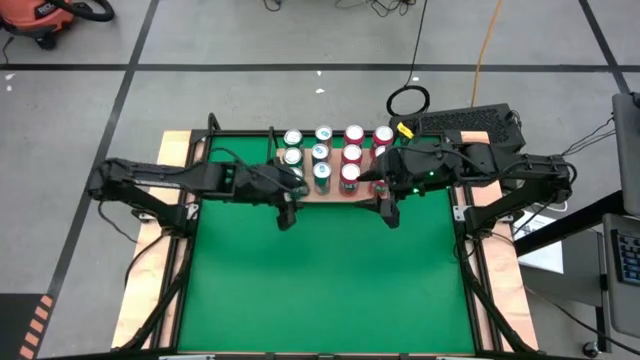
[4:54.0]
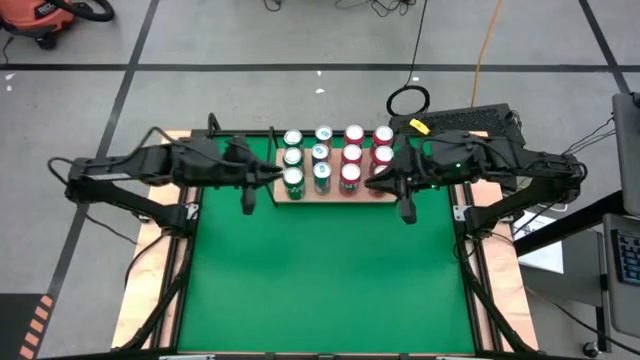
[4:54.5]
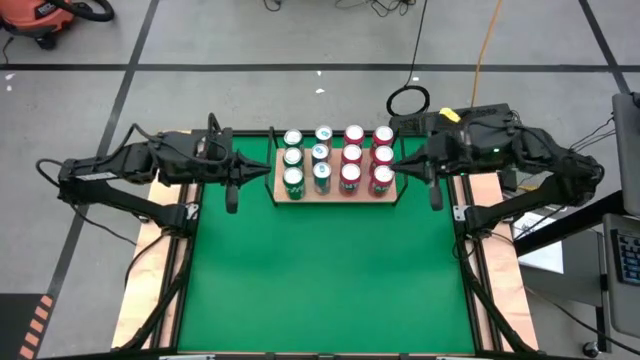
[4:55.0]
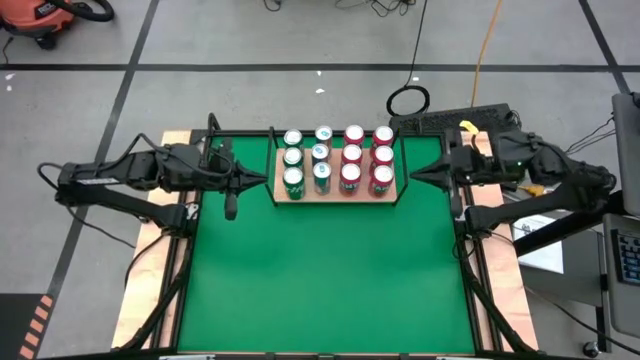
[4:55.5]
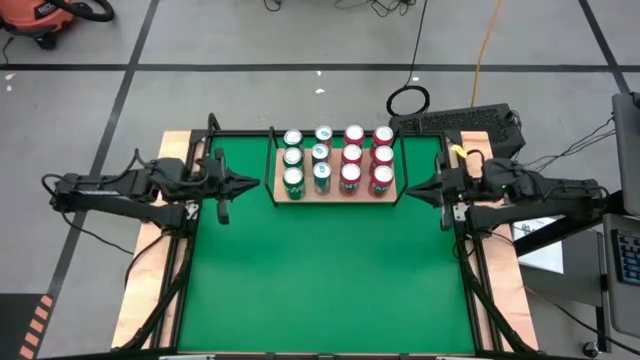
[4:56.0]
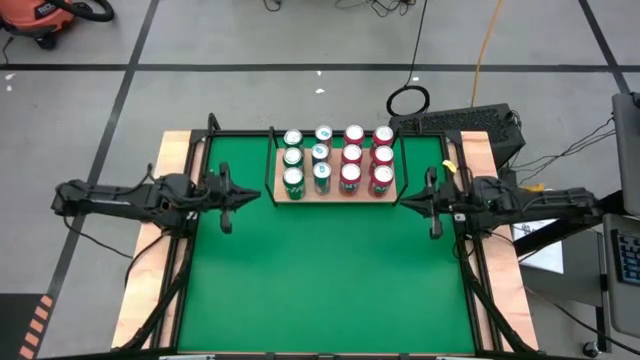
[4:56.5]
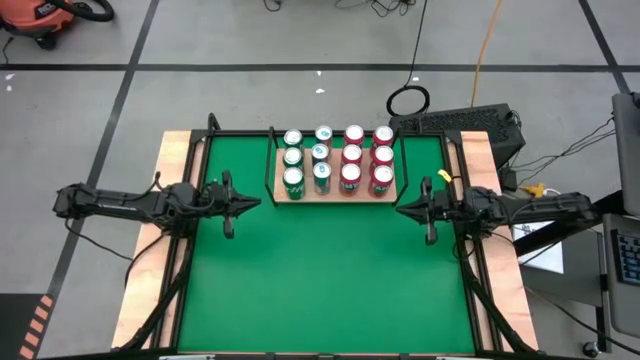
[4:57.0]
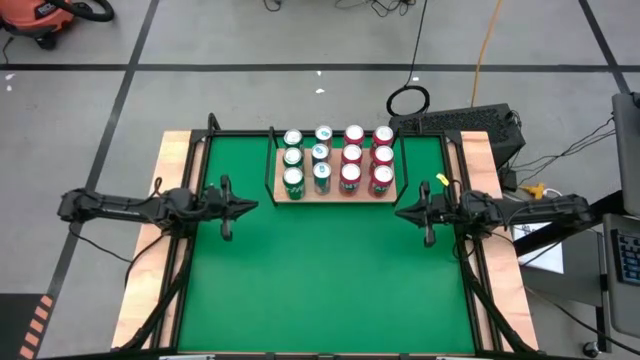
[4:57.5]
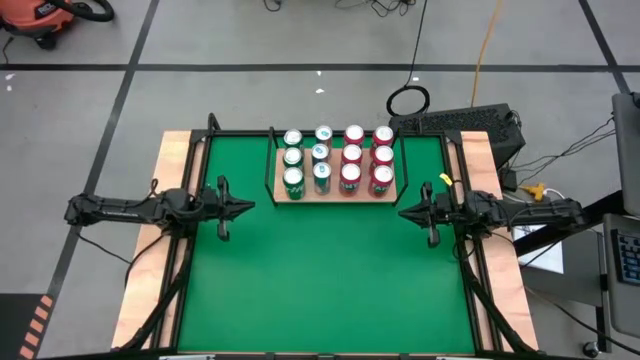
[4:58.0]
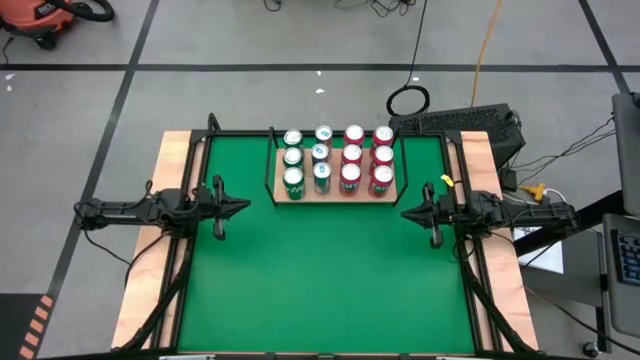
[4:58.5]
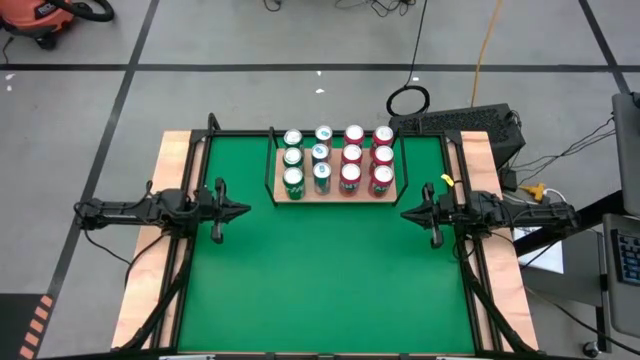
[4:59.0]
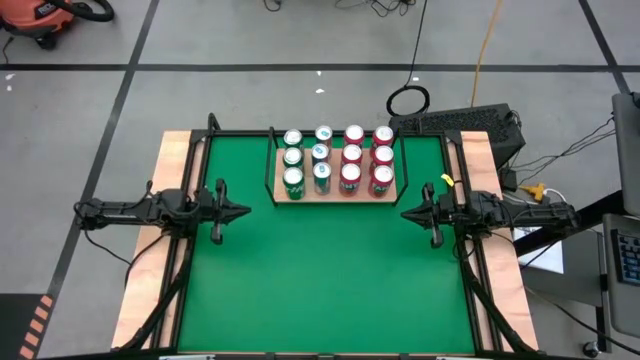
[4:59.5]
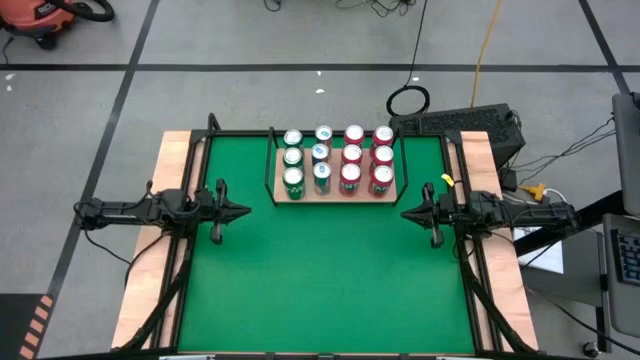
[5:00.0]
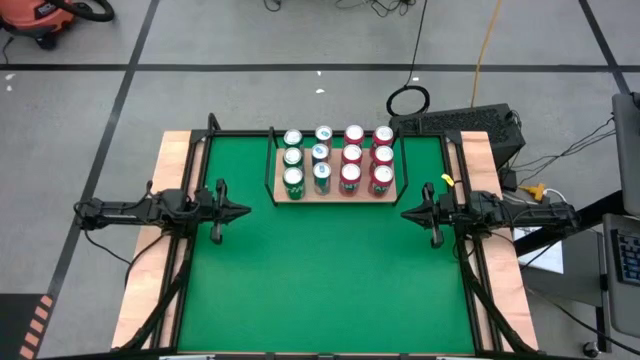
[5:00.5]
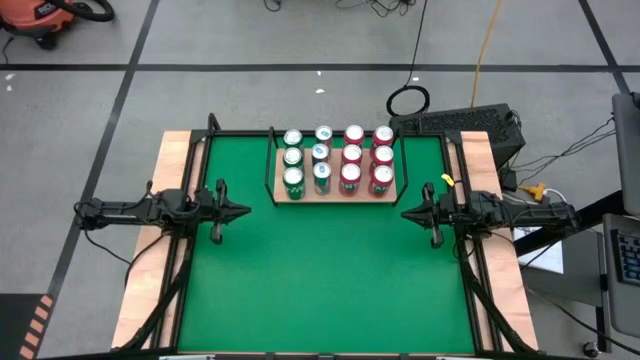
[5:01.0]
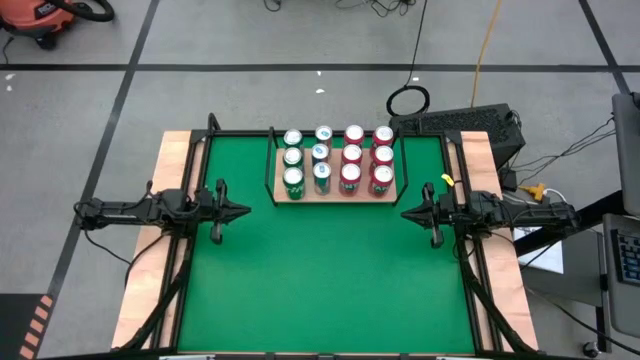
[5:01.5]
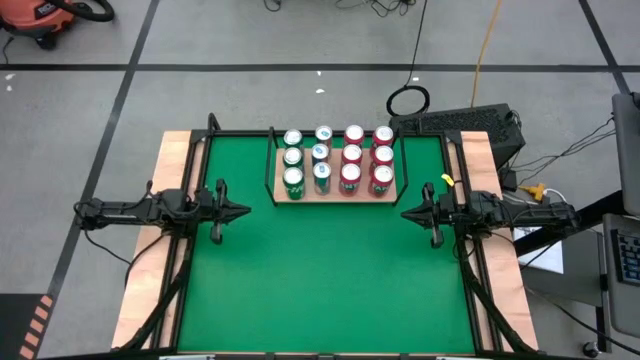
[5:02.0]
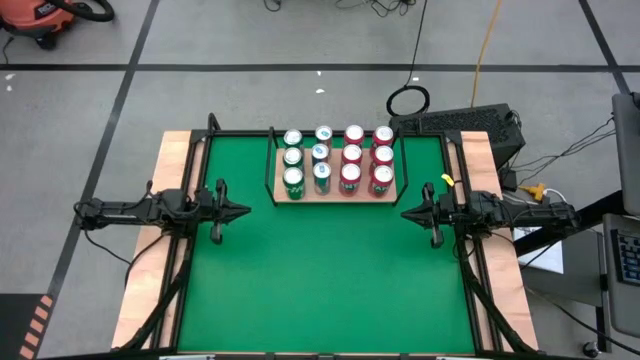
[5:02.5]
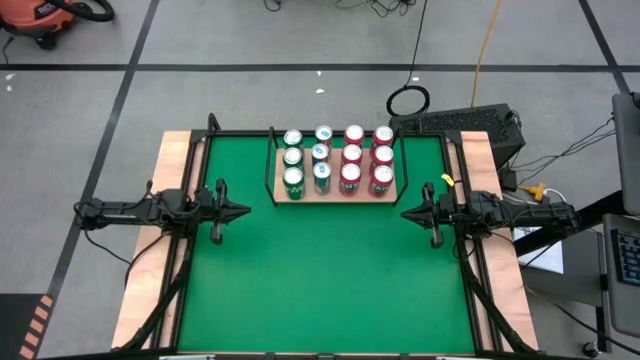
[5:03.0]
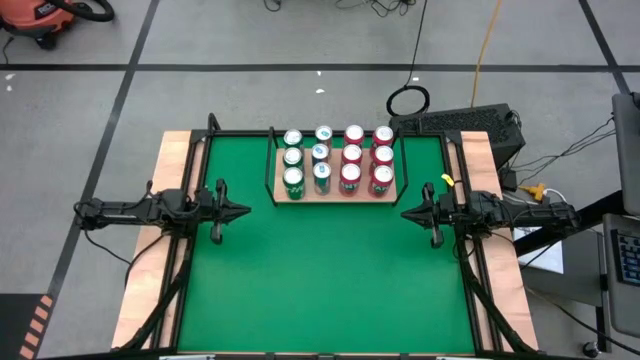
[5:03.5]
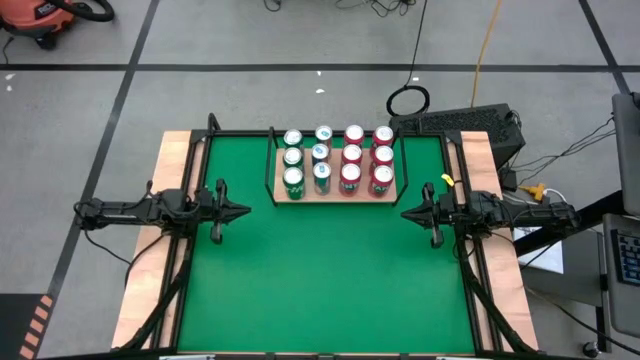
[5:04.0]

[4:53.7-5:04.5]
Task: Place canned beverage on shelf
Return to Home Position

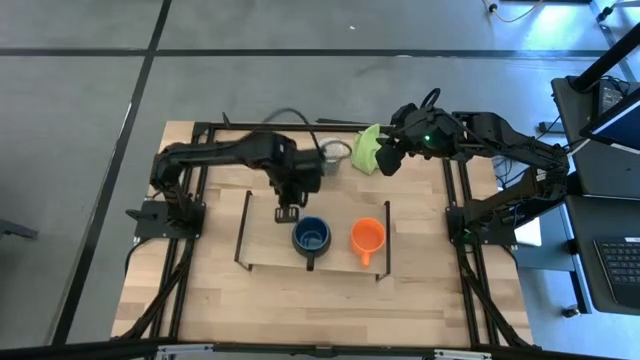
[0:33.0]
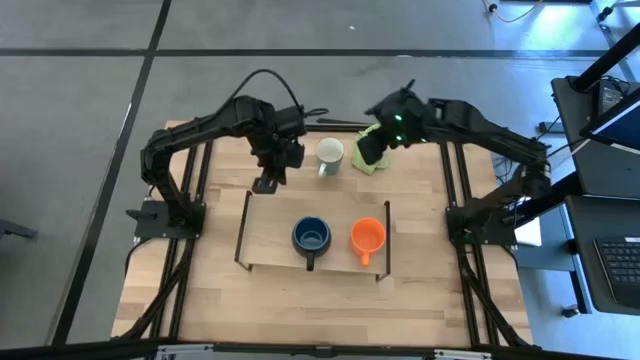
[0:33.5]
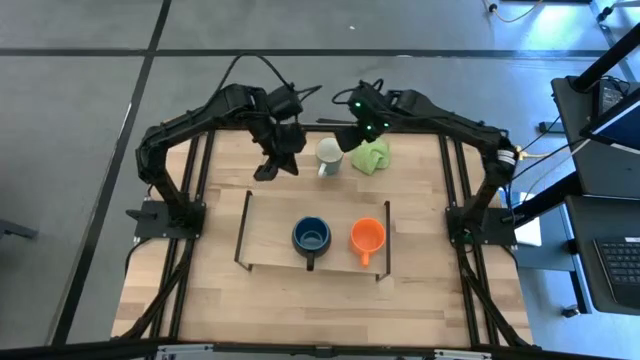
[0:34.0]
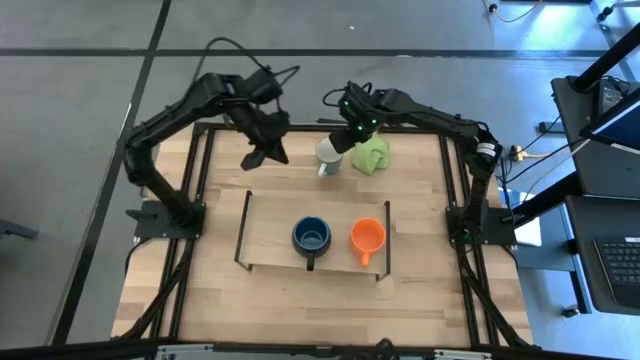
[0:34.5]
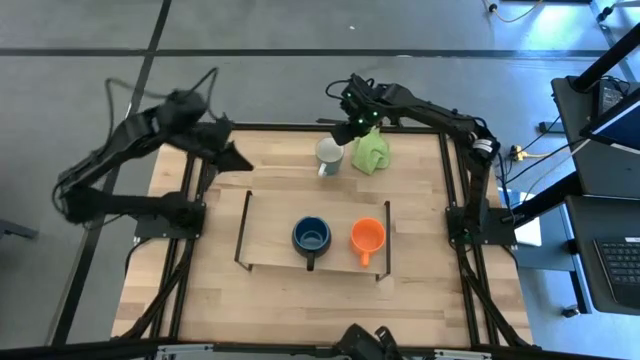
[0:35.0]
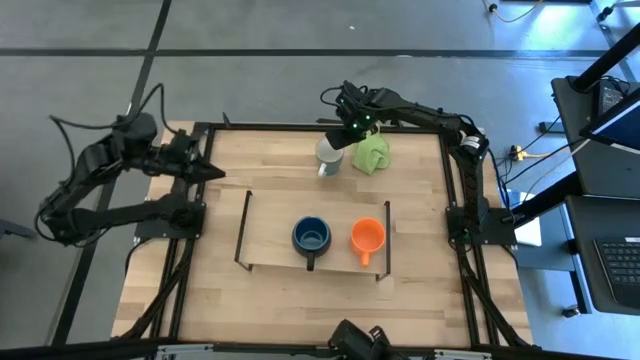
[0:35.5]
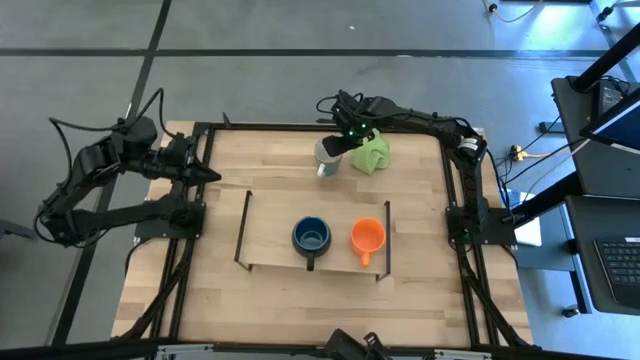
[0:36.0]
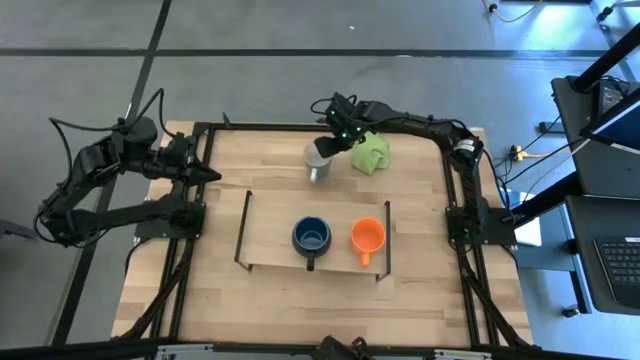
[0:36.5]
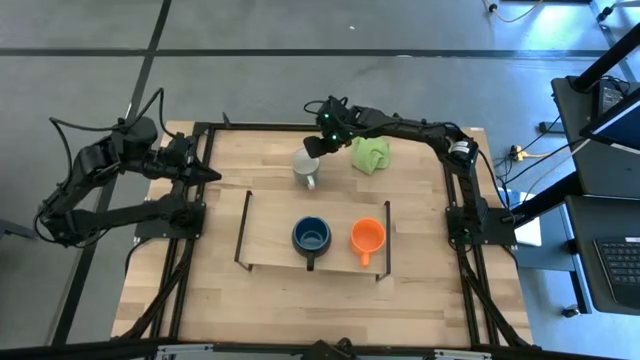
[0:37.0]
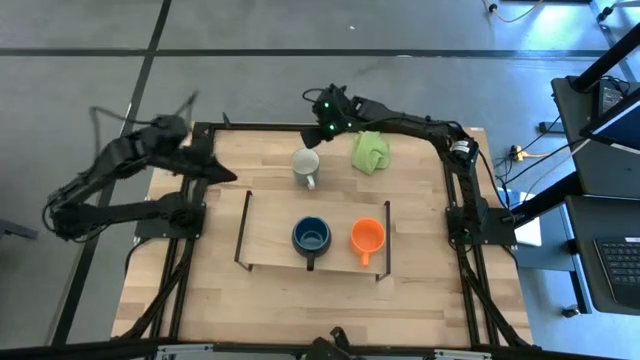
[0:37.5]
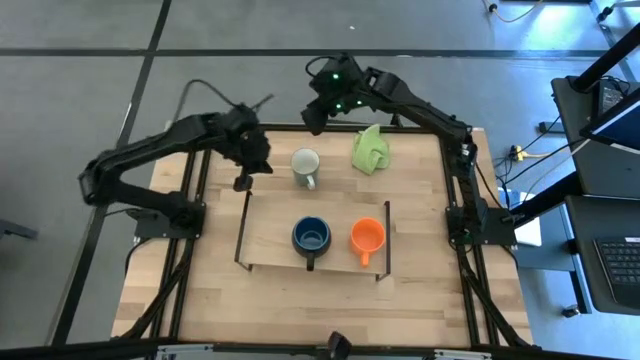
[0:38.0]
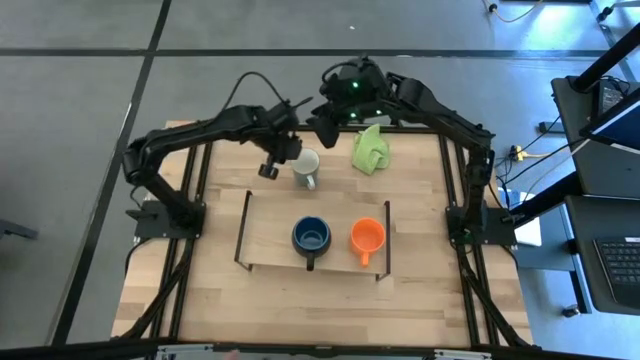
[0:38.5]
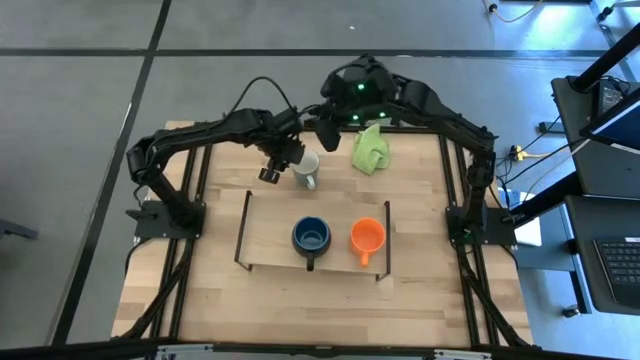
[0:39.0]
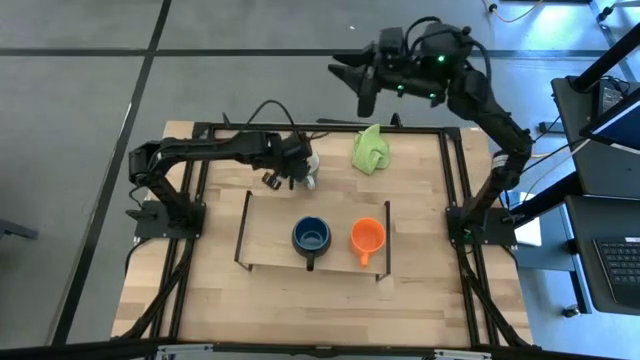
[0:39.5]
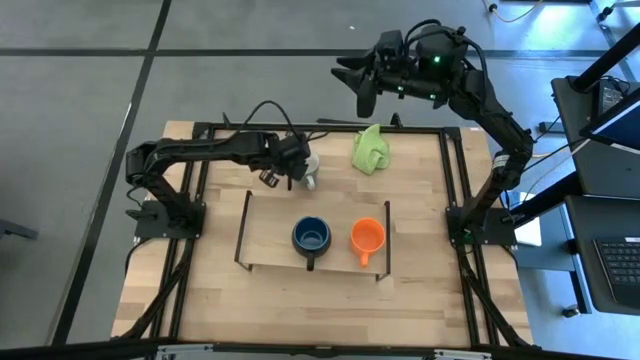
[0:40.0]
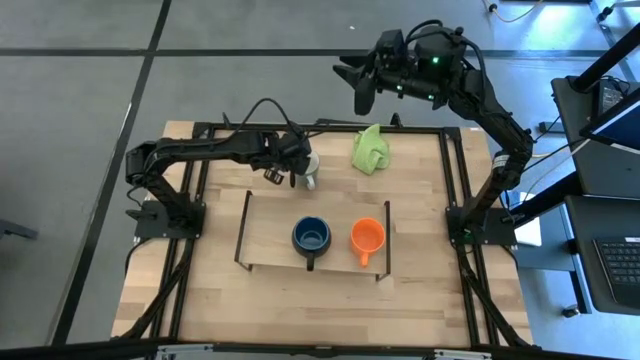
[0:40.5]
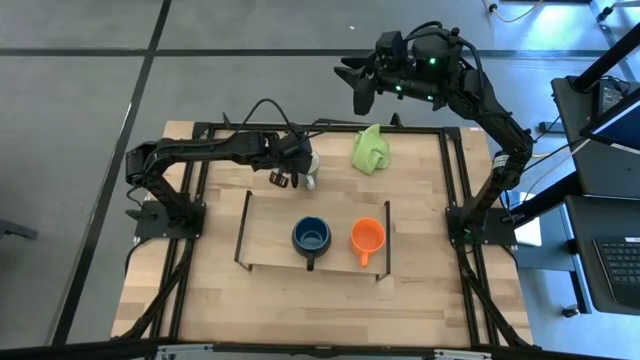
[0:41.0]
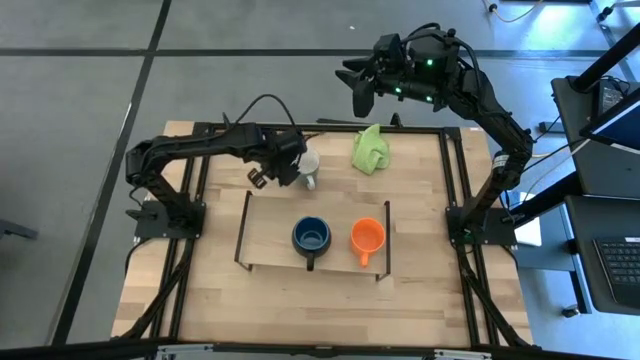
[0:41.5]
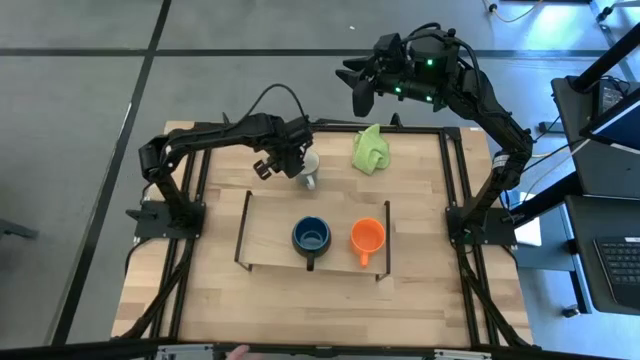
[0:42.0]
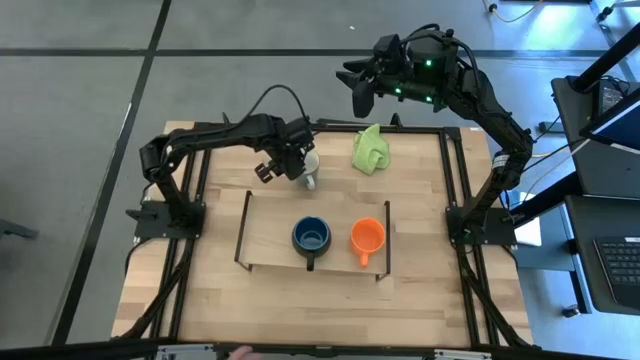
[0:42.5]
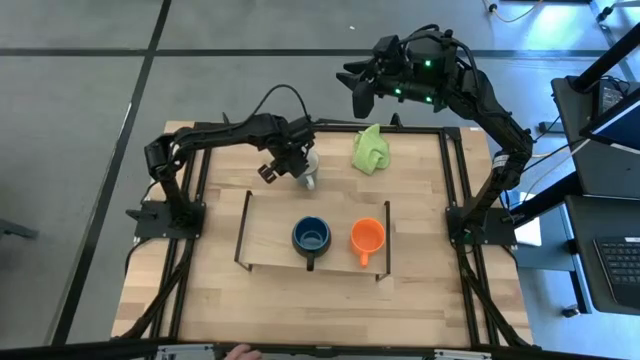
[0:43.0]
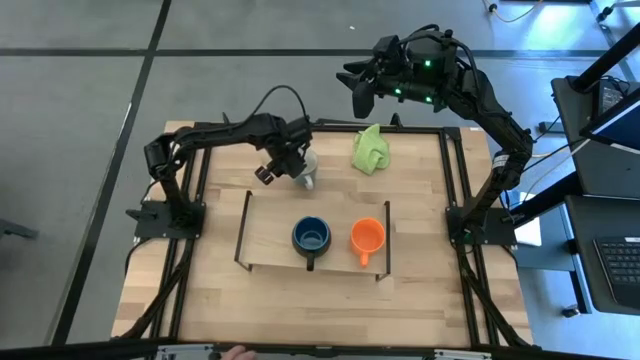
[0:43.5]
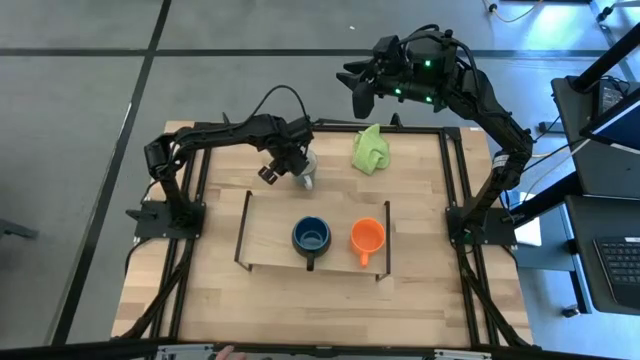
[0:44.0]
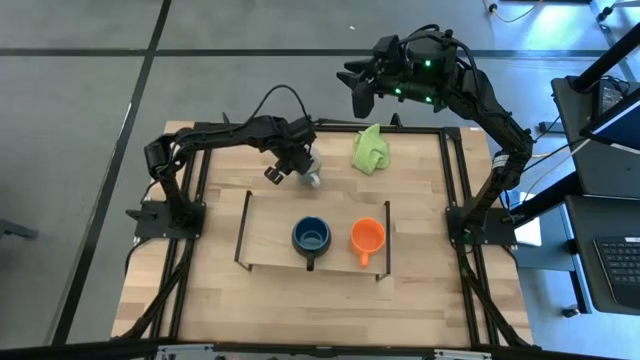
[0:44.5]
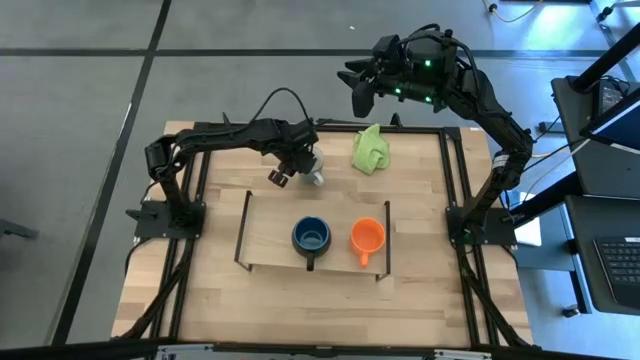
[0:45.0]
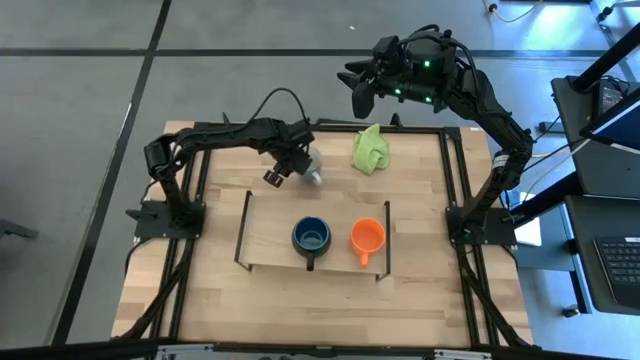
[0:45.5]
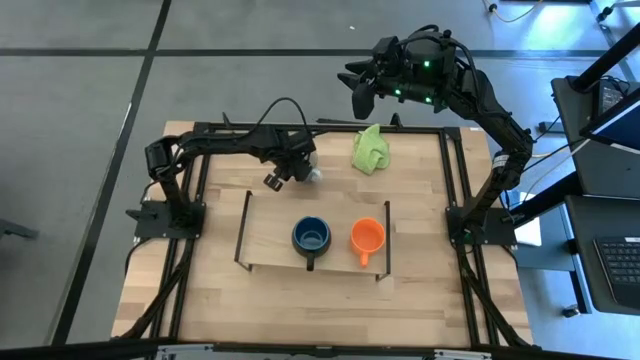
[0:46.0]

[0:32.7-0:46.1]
Task: Stack small to large cups/mugs on shelf
Put the white mugs on the shelf
